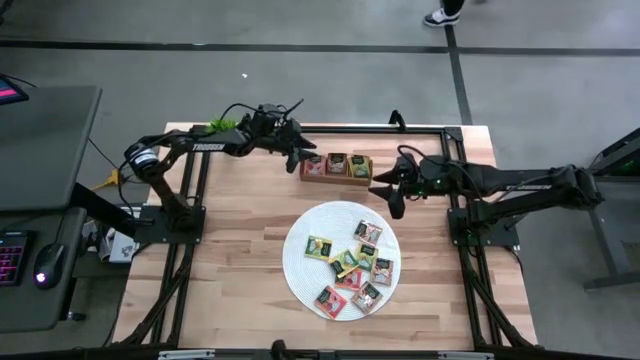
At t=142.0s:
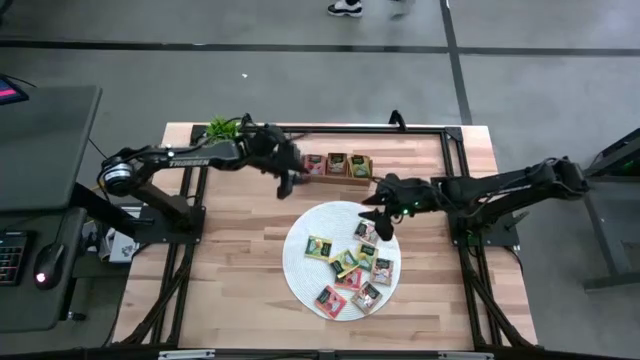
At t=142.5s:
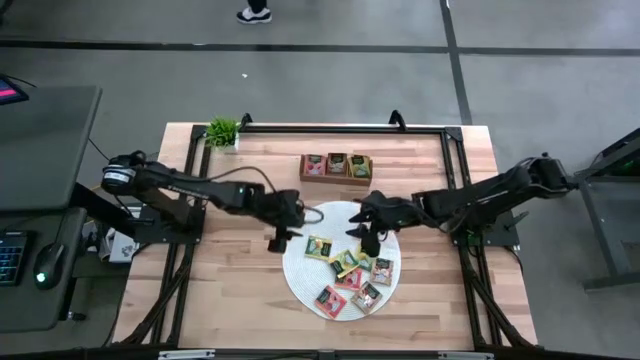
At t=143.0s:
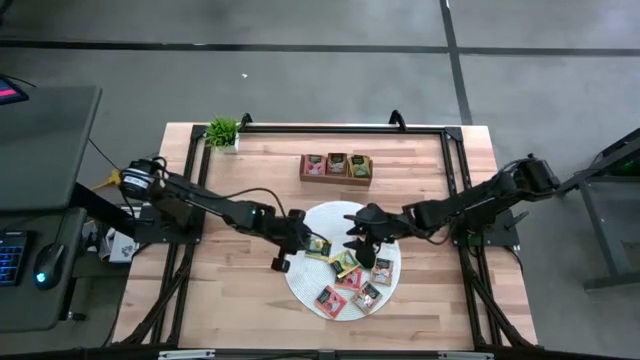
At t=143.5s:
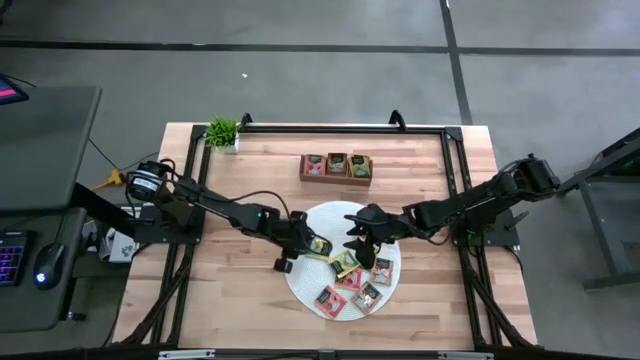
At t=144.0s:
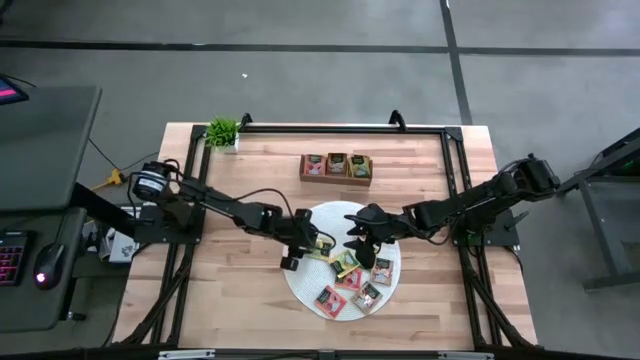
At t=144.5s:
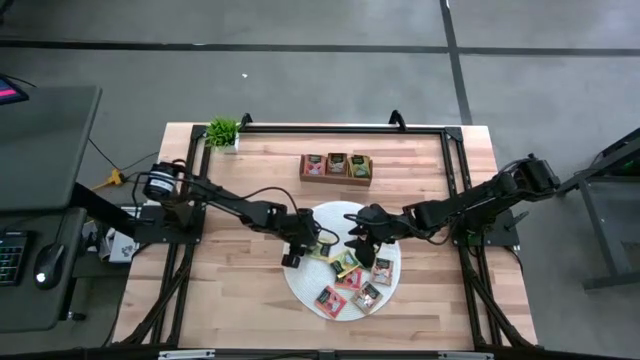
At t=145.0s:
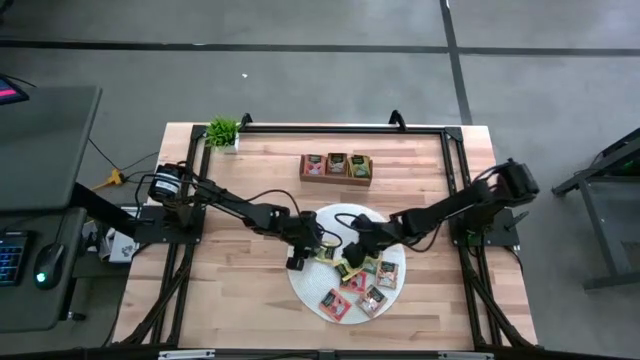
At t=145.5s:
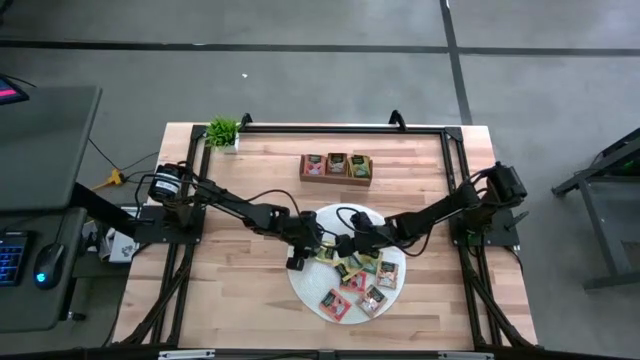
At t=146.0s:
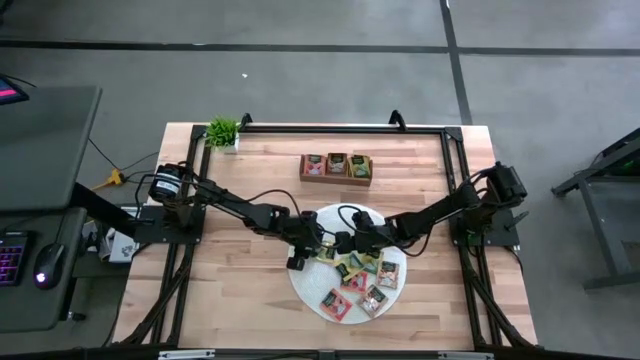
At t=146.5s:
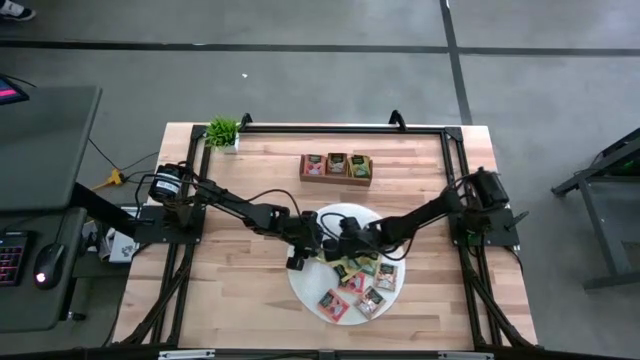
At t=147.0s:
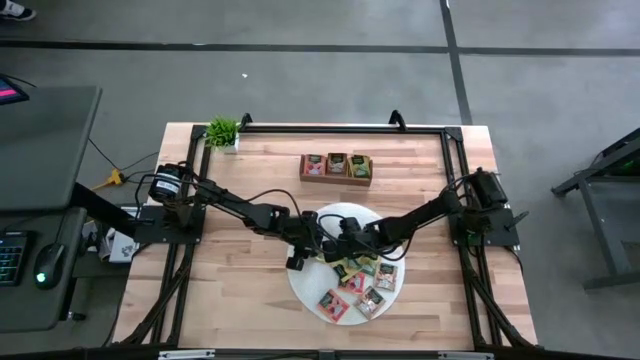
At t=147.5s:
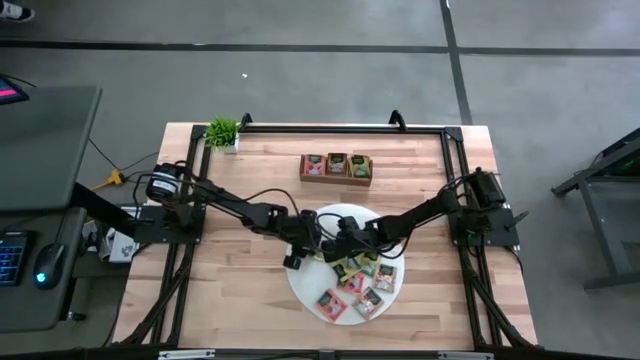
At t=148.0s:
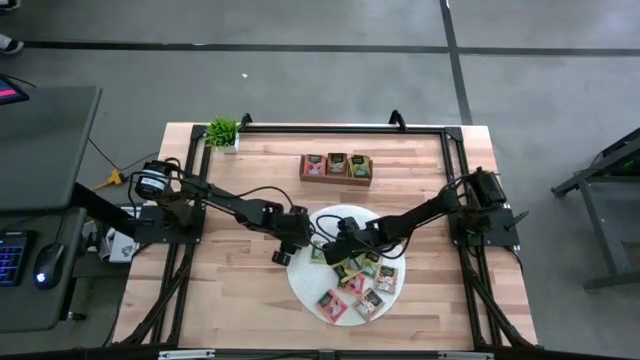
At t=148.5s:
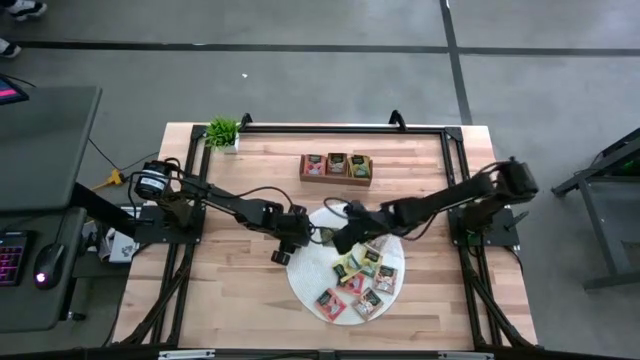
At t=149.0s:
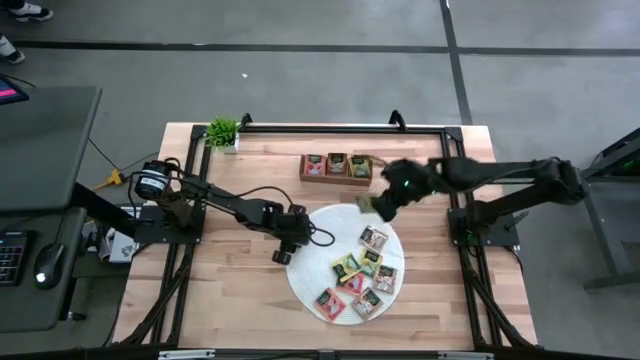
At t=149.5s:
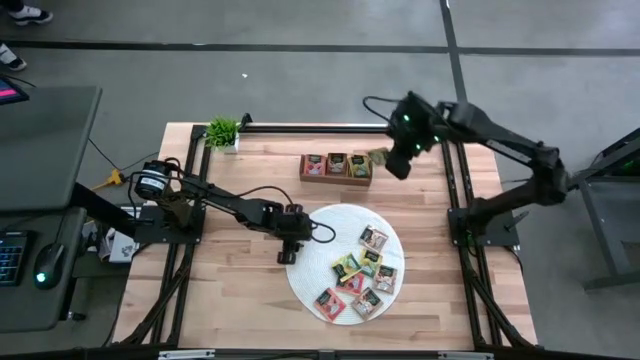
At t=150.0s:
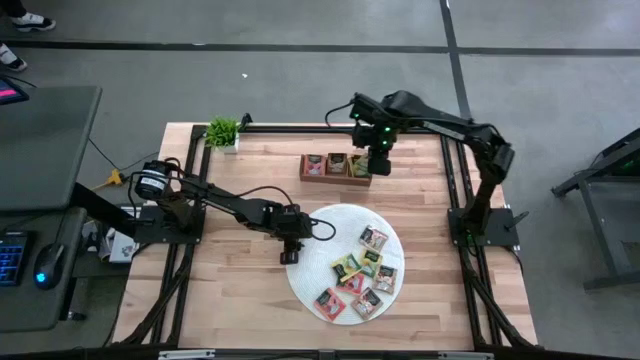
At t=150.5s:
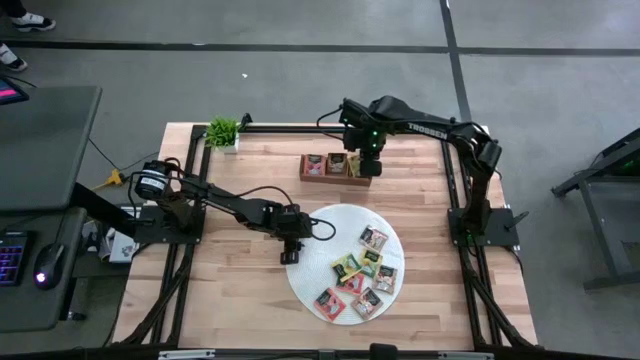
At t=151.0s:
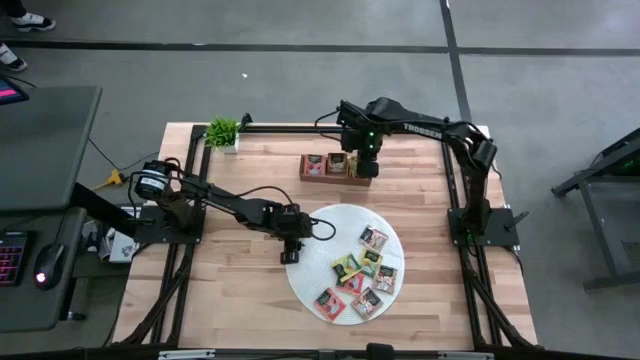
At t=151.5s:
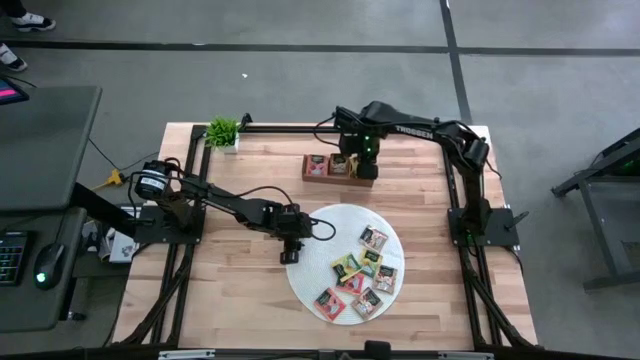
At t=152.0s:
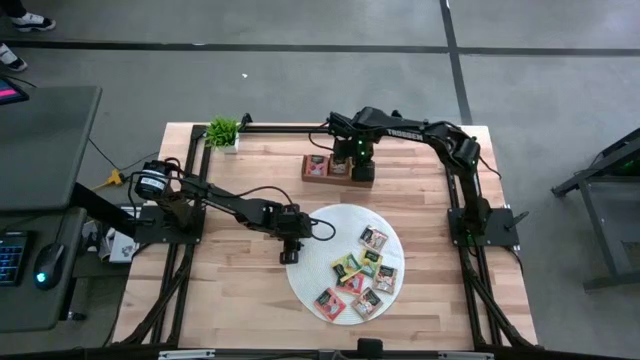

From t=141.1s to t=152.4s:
Task: Pick & Place Tea
Put the yellow tea bag into the right section of the wooden organizer

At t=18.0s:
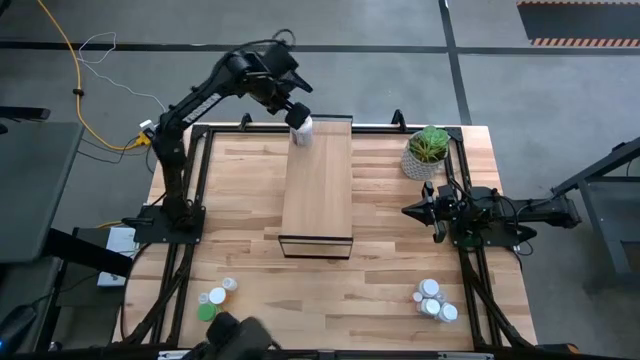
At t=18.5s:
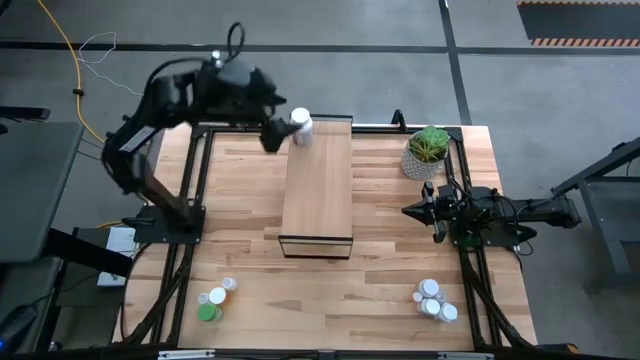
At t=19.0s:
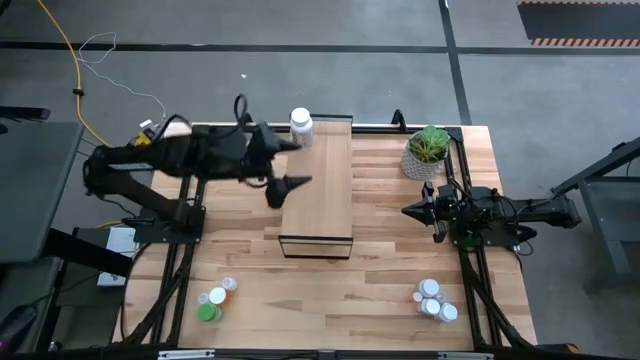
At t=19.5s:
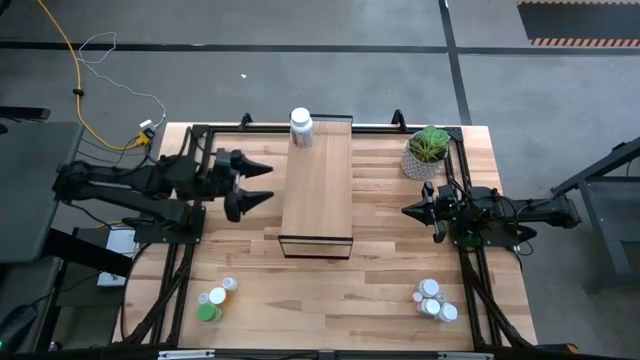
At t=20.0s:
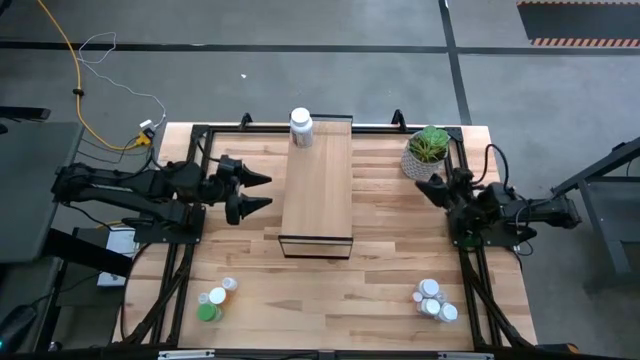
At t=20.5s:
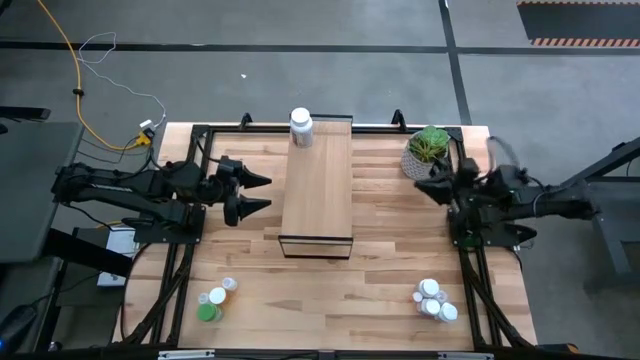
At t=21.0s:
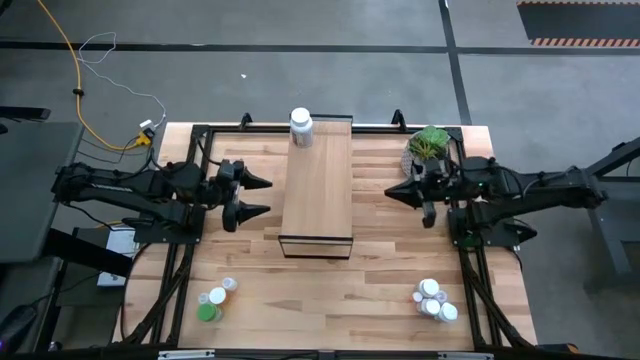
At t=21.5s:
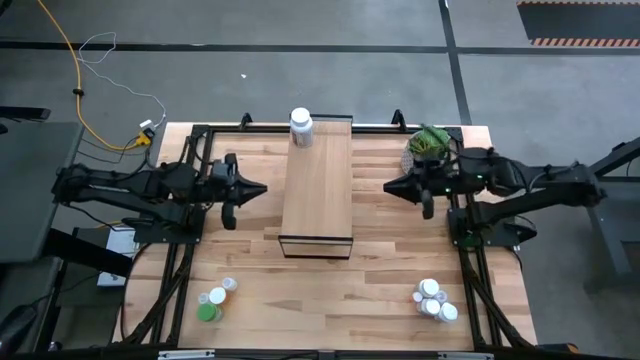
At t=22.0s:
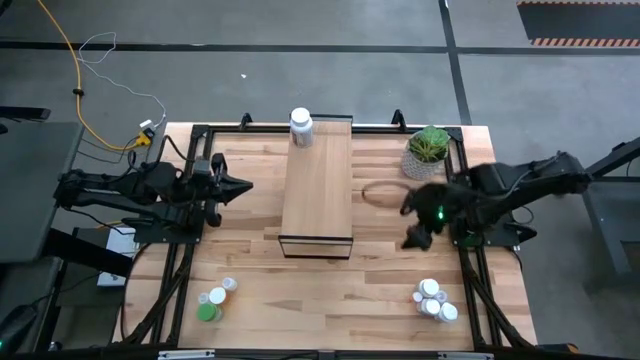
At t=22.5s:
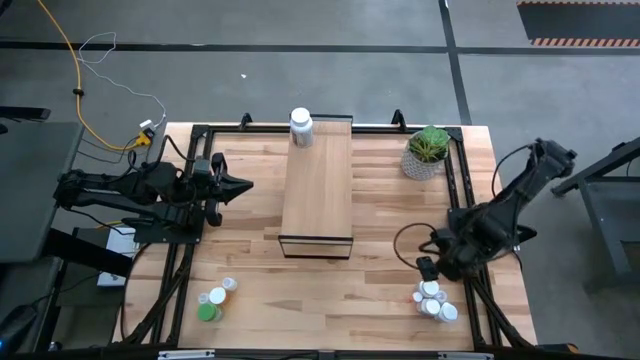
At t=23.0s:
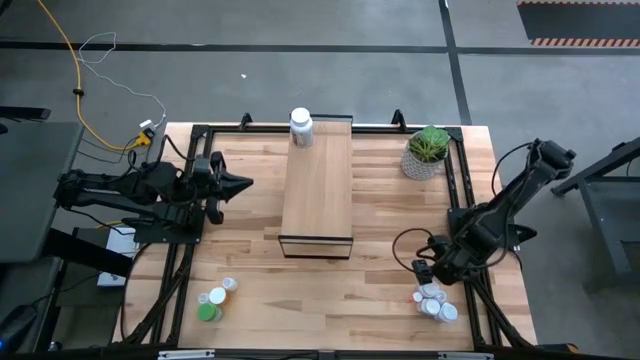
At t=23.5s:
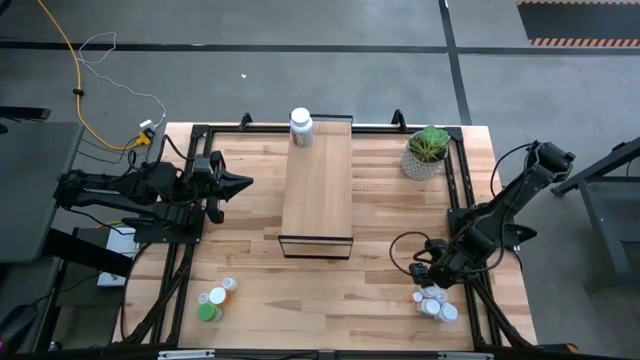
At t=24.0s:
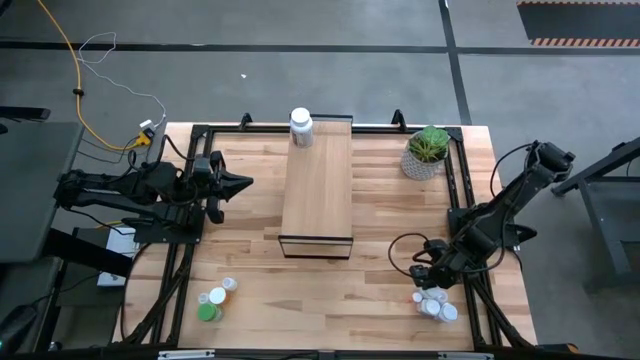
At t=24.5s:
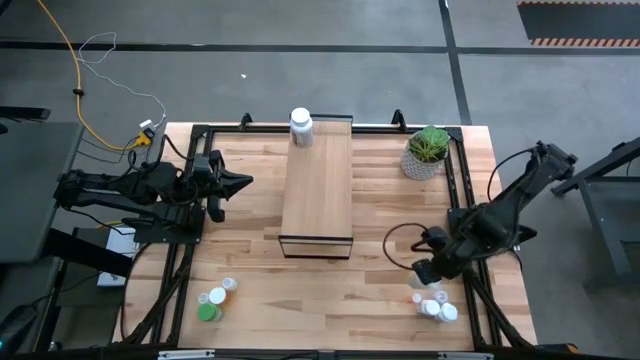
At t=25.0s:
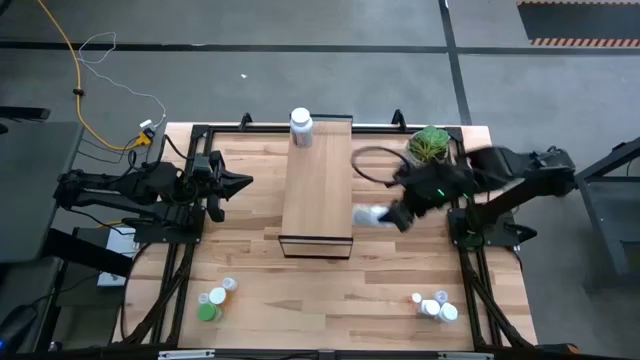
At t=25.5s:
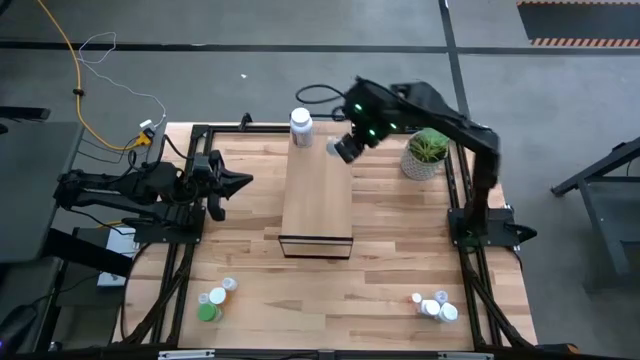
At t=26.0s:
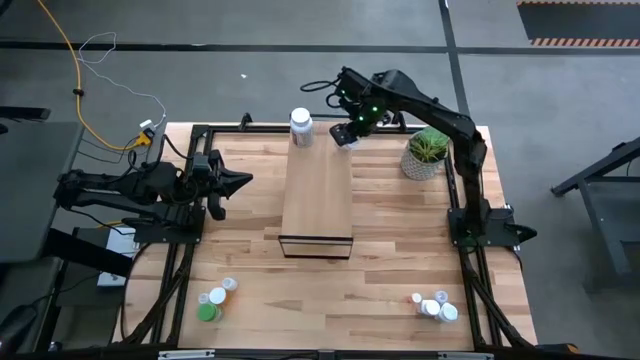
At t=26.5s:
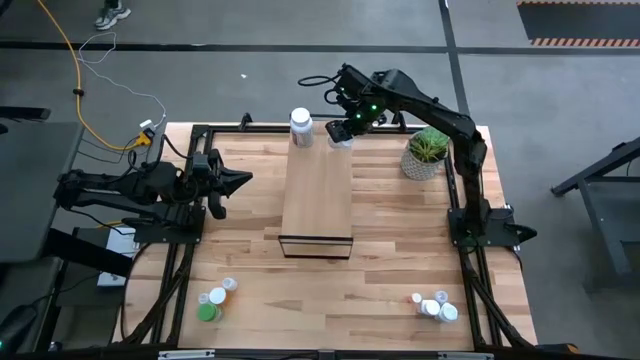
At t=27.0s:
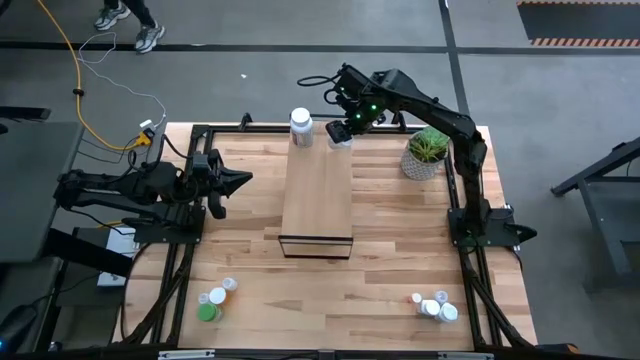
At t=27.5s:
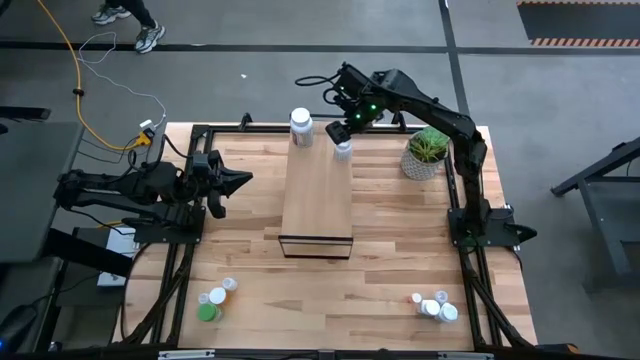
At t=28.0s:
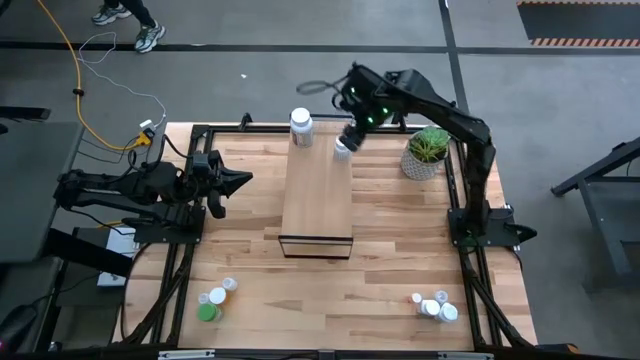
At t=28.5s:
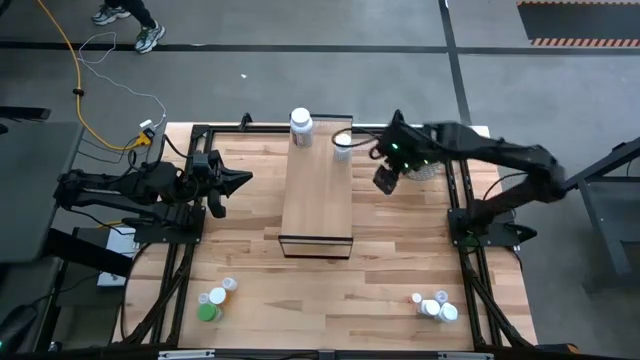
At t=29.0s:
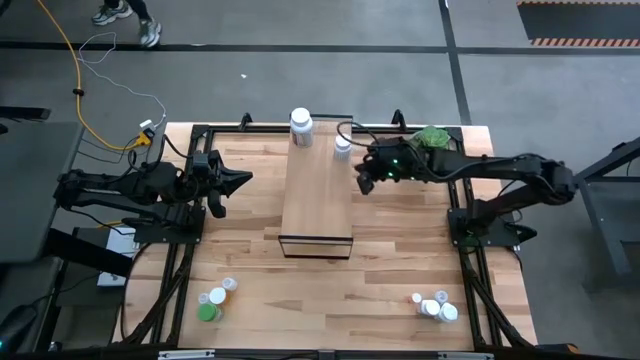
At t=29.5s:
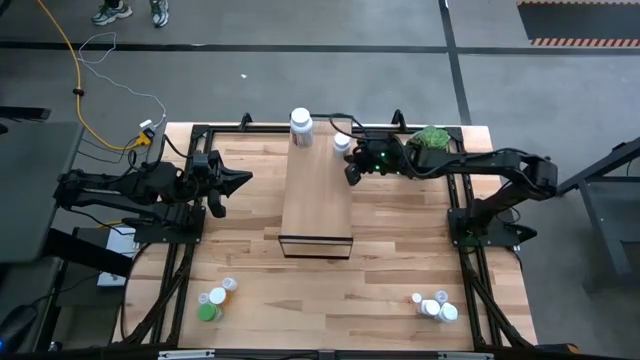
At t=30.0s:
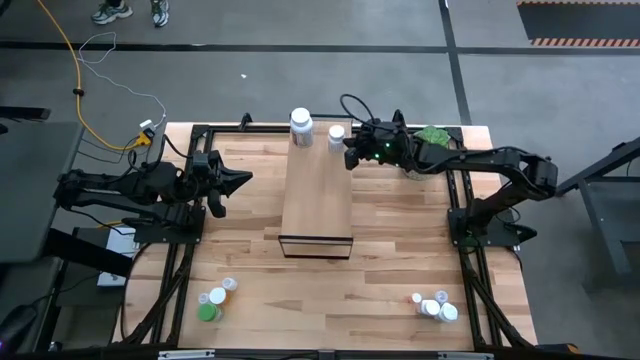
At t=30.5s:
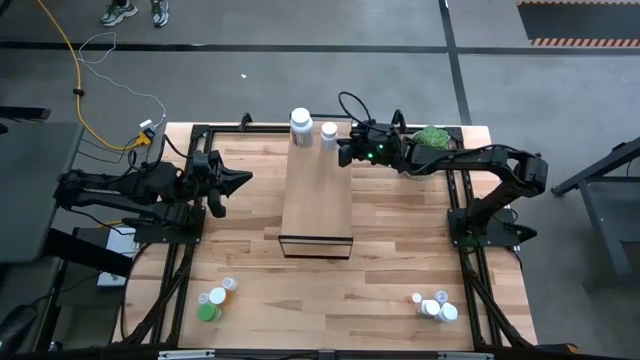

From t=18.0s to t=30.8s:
Task: Pick and place medicine bottles onto shelf by color
Put the green medicine bottle on the shelf
